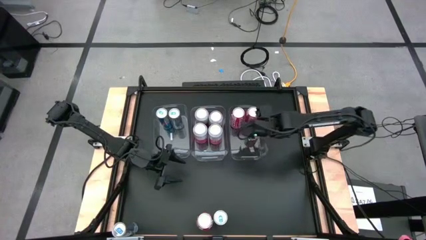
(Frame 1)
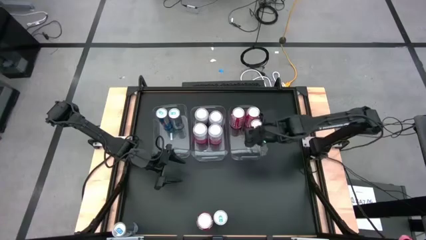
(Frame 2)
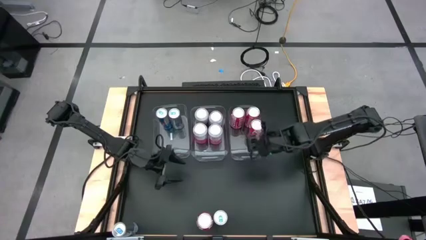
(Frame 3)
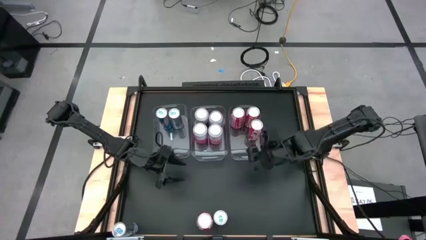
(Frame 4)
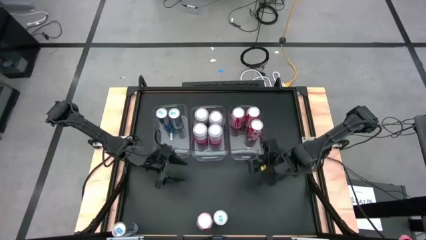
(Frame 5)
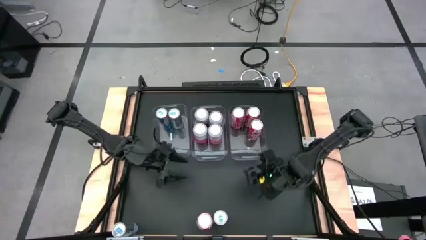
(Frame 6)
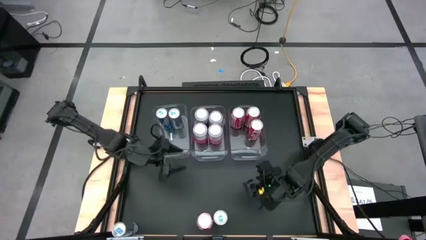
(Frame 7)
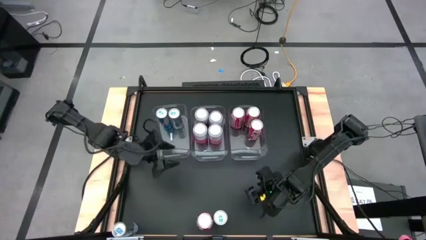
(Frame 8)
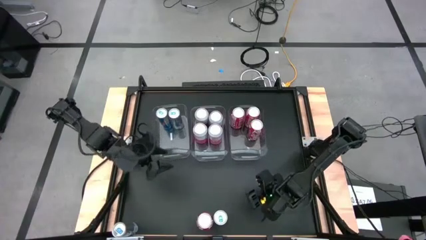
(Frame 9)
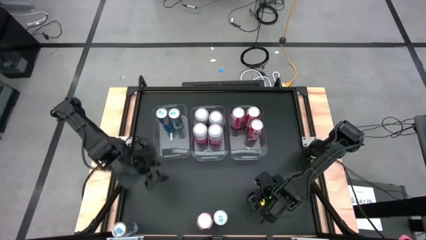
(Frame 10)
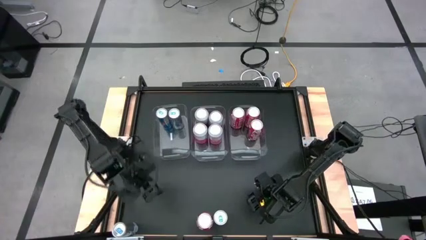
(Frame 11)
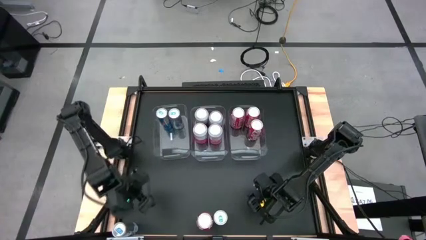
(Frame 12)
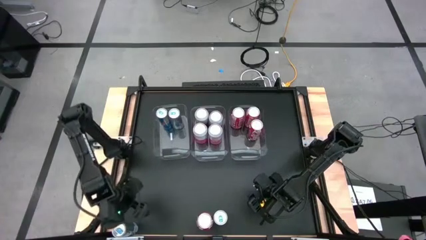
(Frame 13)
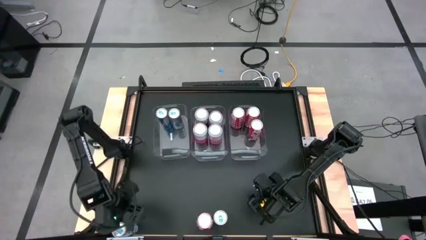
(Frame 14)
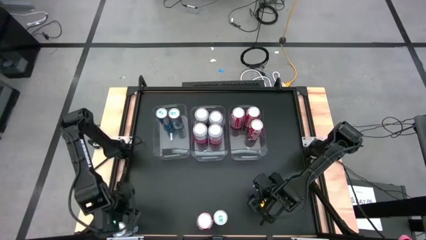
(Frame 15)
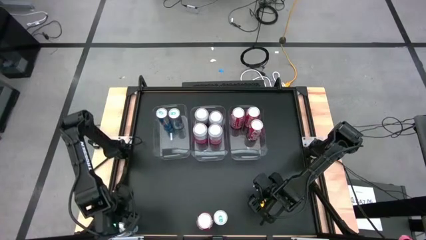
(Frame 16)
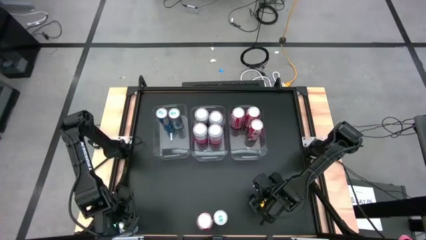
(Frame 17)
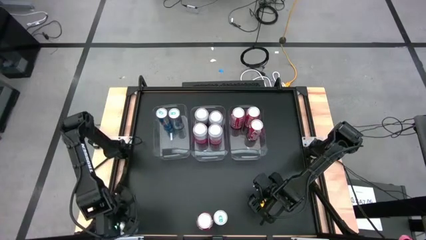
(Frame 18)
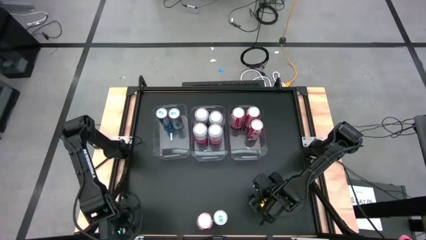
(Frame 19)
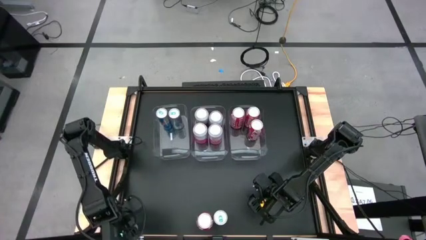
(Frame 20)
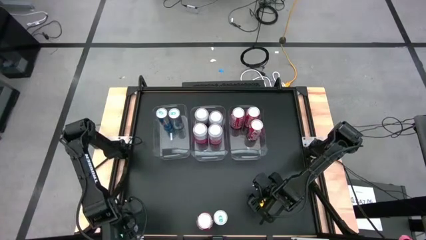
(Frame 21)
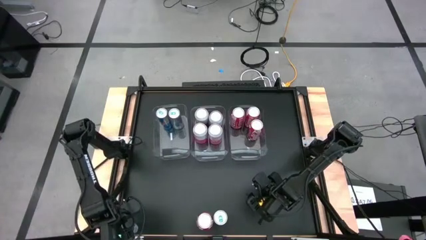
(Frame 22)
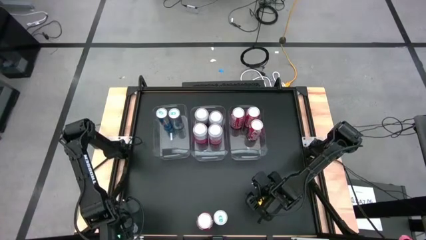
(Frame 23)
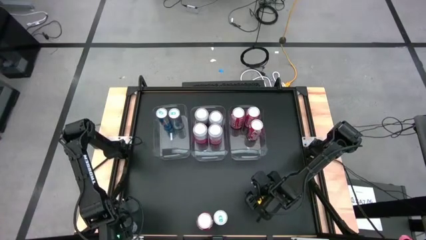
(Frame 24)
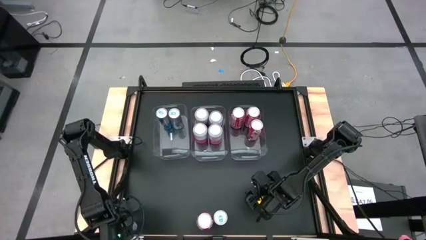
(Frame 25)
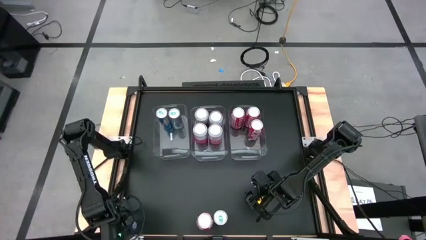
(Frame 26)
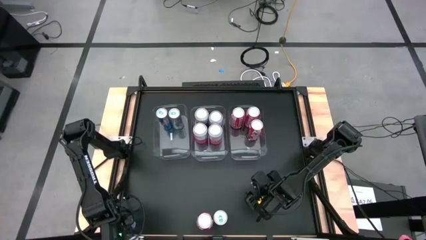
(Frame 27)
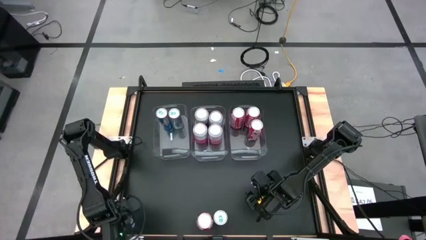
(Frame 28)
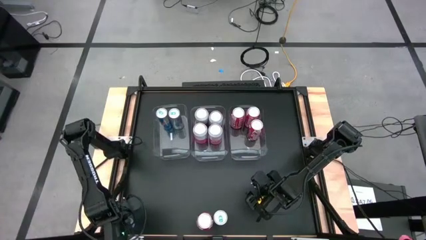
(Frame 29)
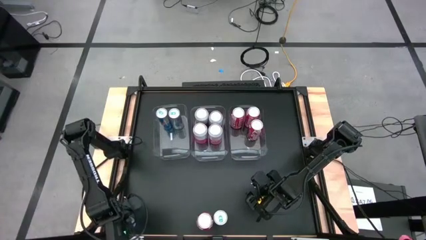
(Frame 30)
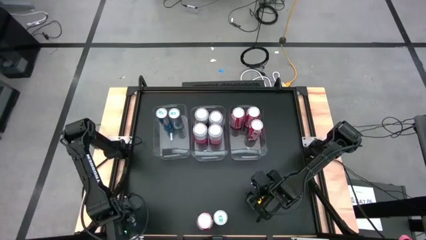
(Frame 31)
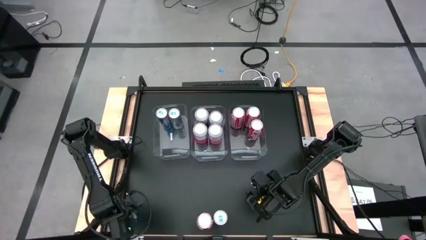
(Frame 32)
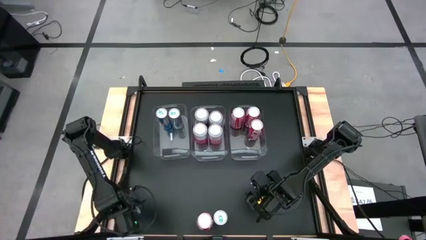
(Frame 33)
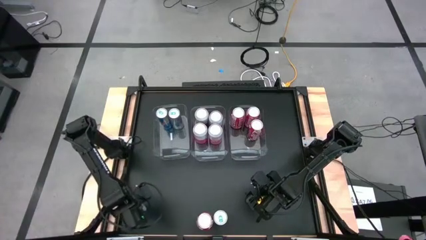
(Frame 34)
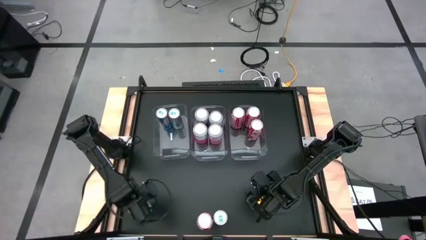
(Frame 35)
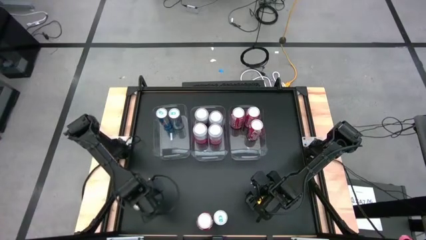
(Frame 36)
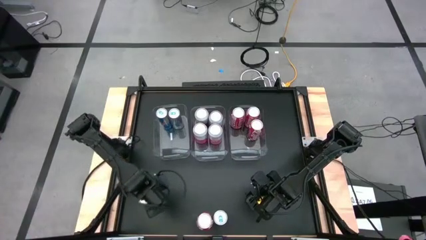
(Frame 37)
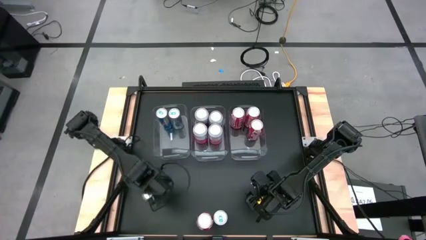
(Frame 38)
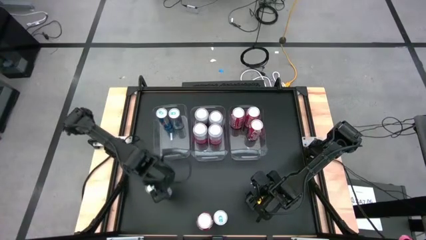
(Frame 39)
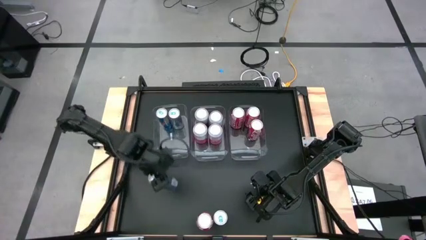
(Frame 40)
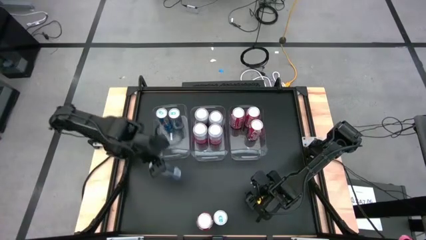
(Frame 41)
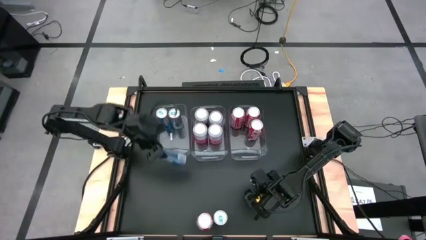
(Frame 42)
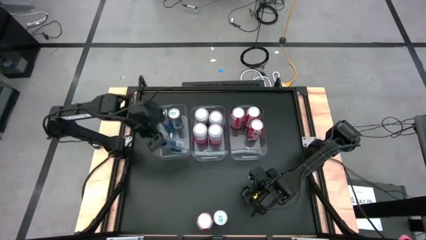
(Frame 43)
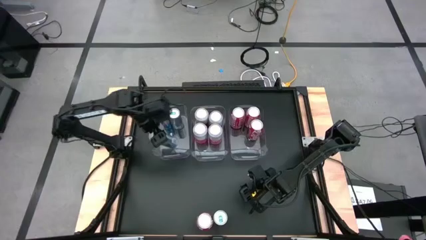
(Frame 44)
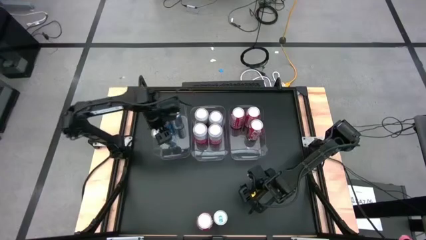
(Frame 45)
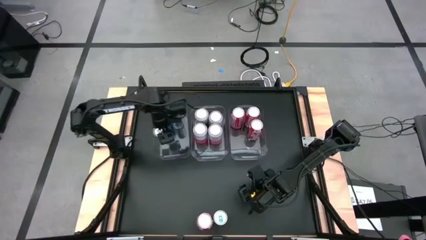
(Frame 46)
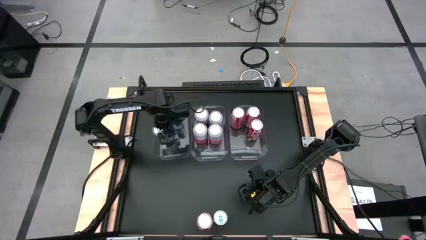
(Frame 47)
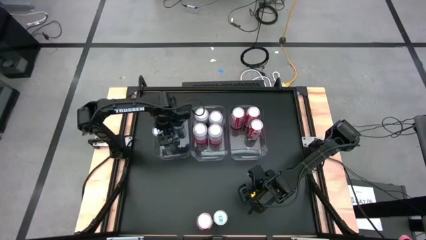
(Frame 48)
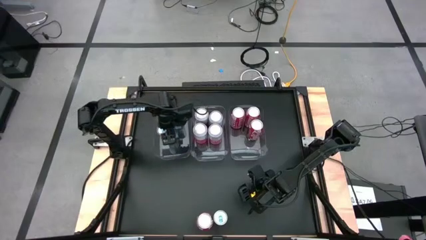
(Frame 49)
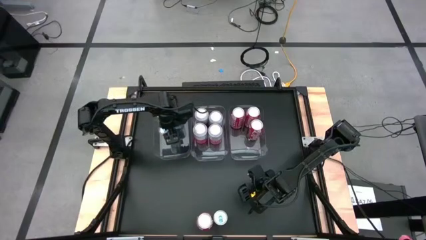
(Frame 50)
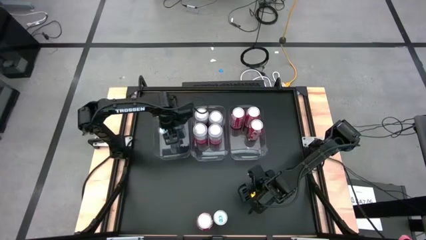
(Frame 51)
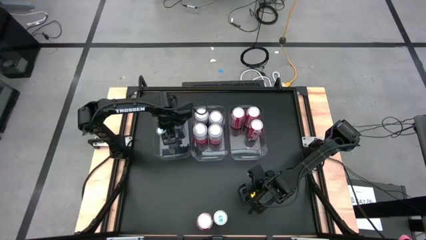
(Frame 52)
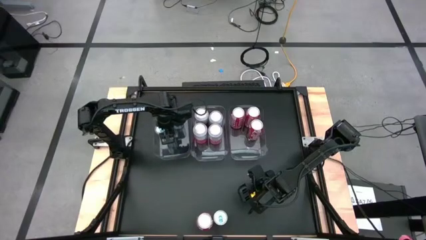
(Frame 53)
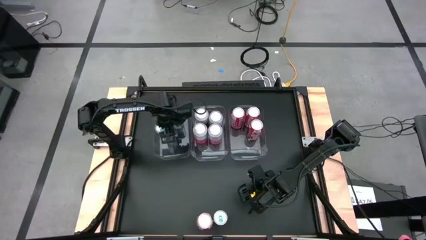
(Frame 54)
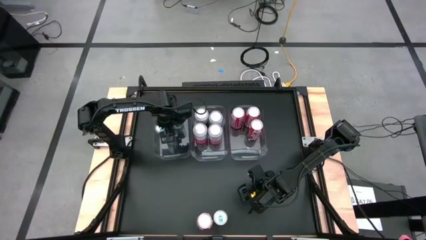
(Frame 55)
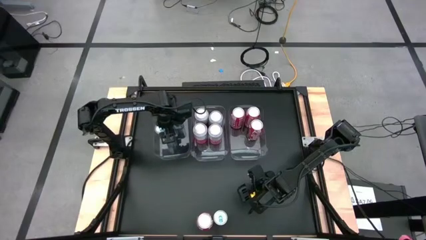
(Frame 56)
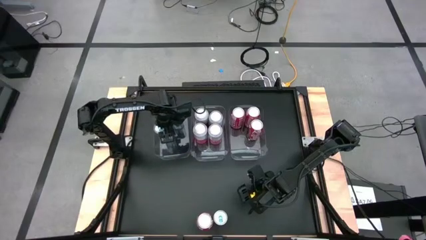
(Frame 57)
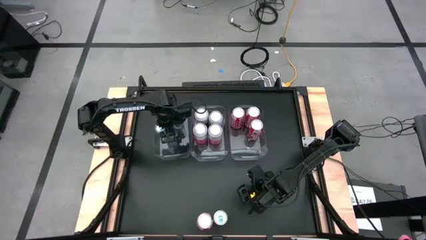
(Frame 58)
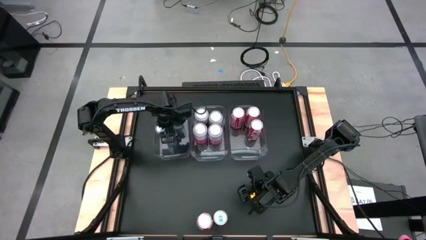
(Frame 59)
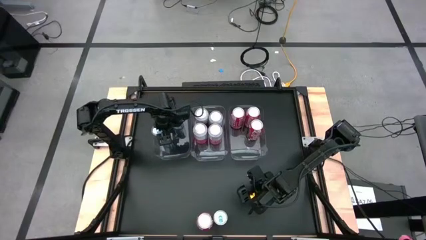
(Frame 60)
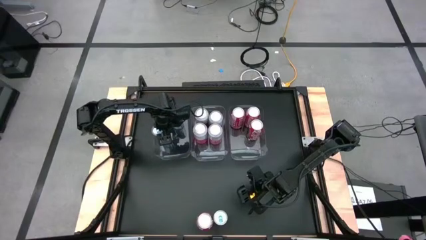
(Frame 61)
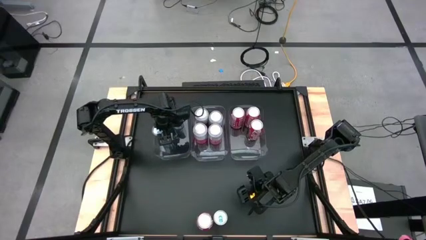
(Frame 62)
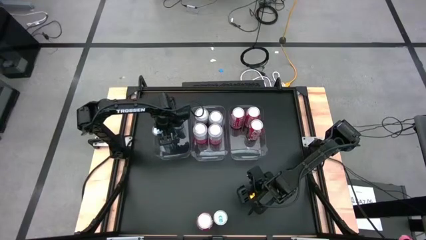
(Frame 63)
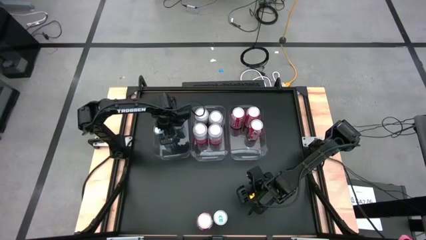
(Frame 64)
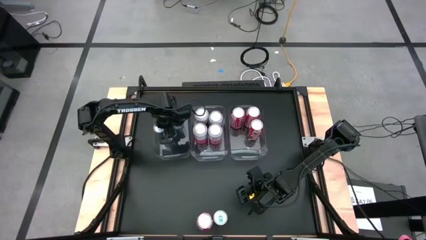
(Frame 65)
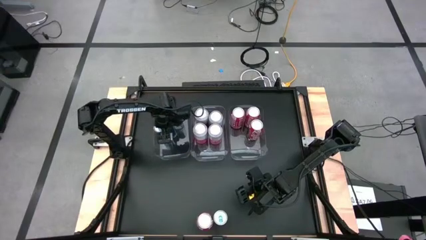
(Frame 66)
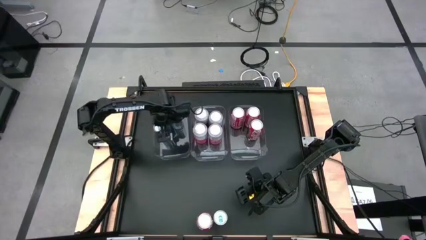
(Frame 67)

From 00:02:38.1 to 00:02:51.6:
Task: Sort soda cans
Put the blue soda can into the left transparent bin

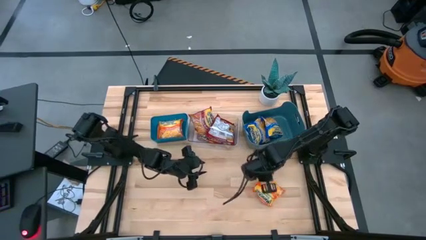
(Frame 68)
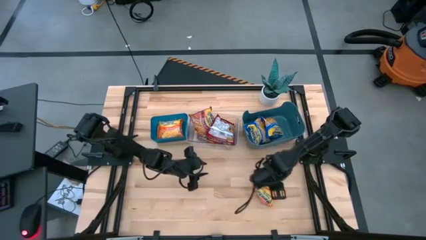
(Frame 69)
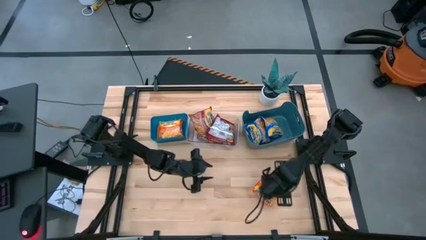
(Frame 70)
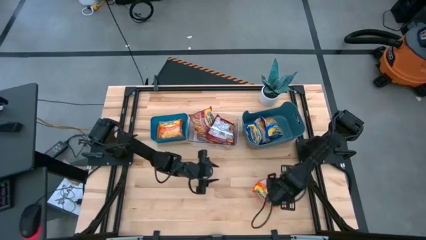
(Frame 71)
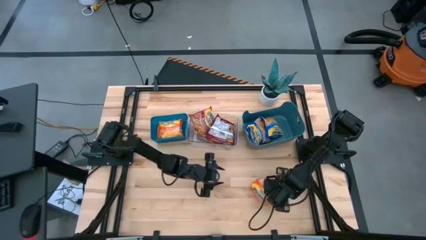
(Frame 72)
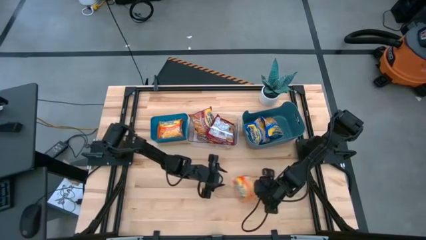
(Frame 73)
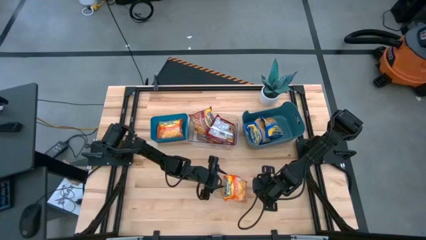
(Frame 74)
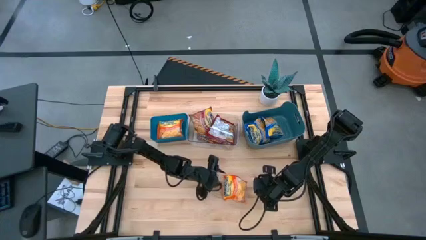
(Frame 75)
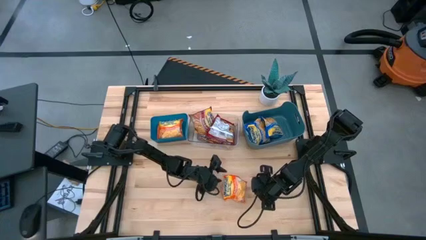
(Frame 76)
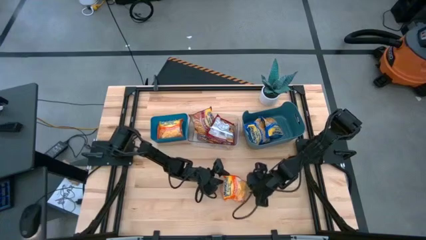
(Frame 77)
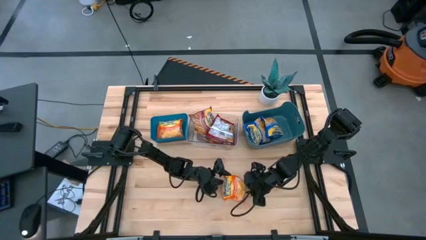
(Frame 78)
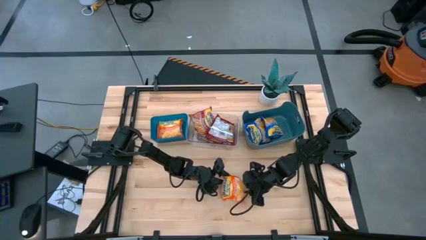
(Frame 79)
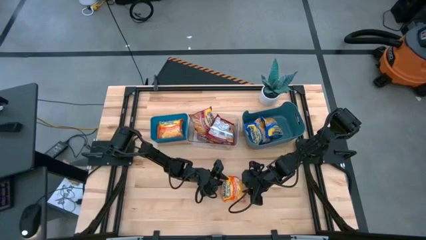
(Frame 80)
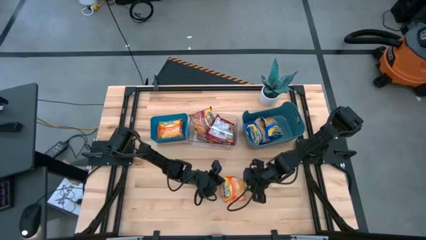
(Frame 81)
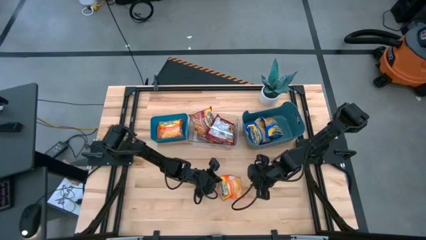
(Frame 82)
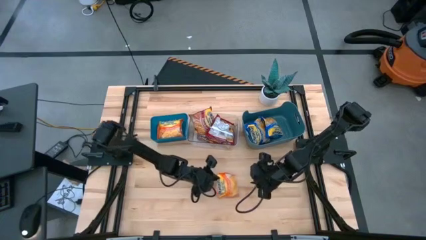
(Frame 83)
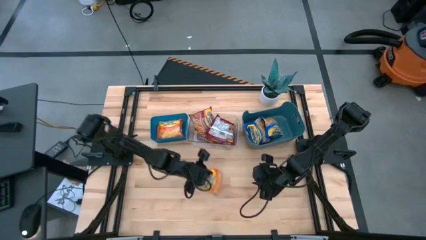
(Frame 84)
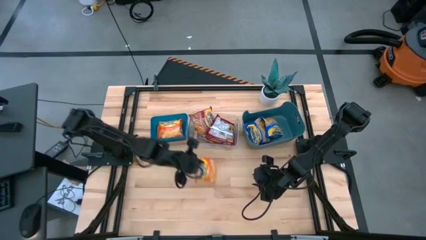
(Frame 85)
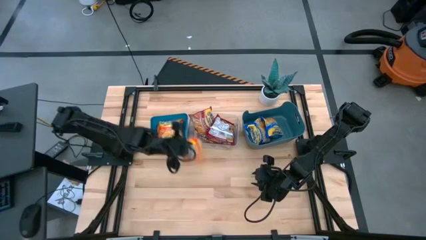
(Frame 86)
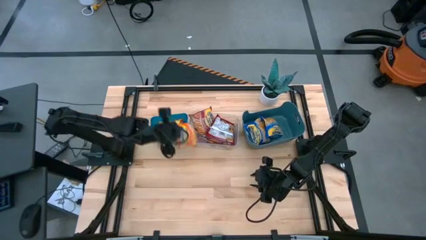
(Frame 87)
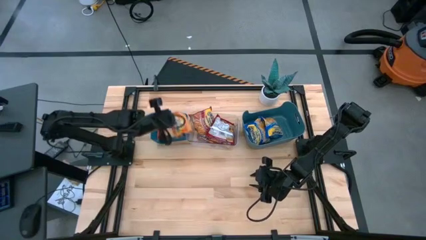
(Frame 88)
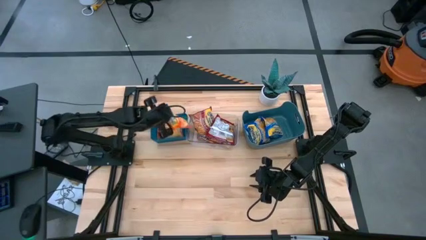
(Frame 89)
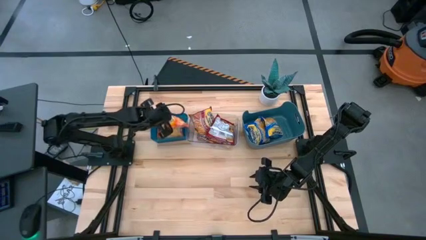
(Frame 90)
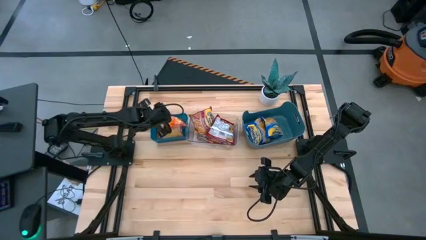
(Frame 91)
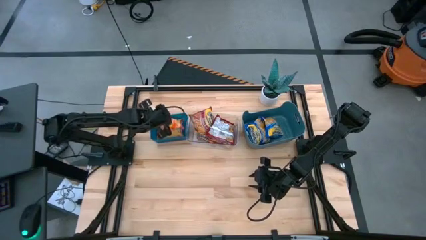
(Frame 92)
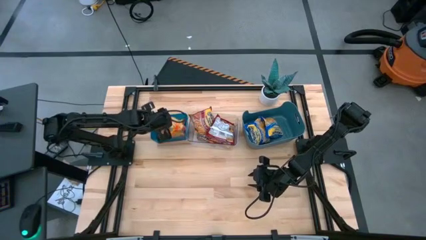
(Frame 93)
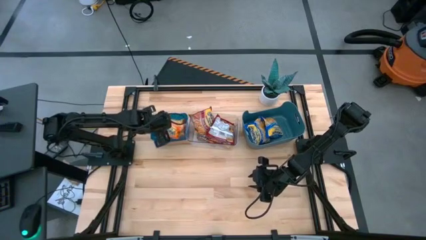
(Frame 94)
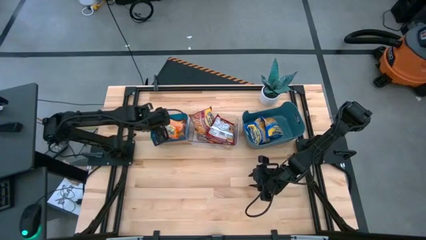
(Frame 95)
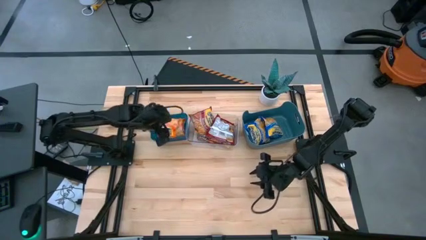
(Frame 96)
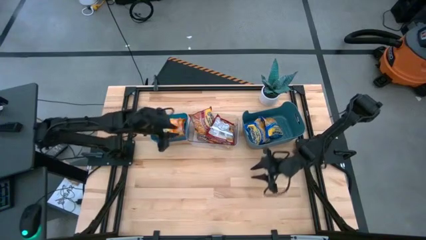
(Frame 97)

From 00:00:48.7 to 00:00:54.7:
Task: Sort Maruchan noodles
Put the orange noodle pack into the left blue bin
